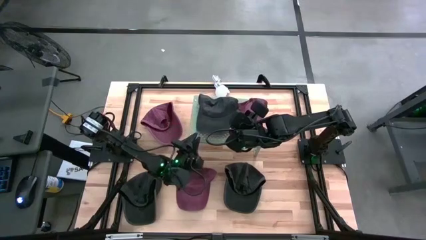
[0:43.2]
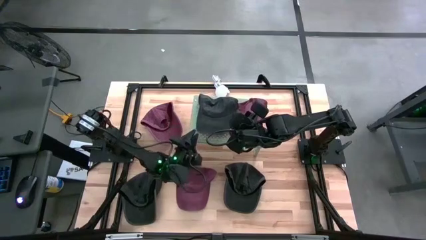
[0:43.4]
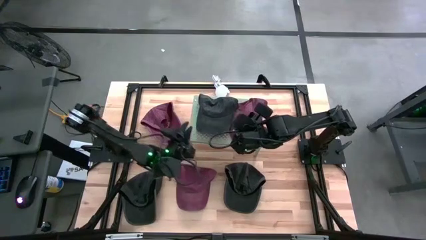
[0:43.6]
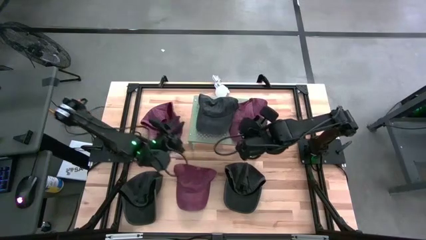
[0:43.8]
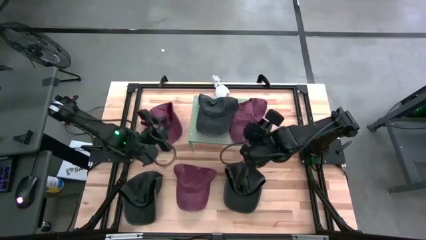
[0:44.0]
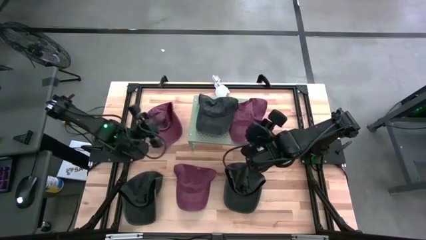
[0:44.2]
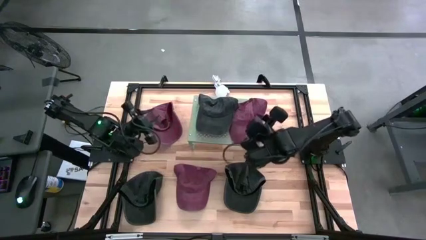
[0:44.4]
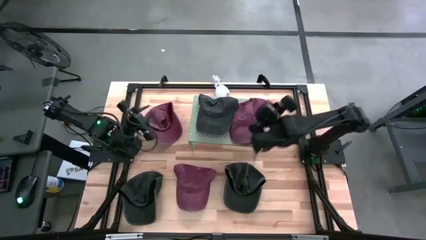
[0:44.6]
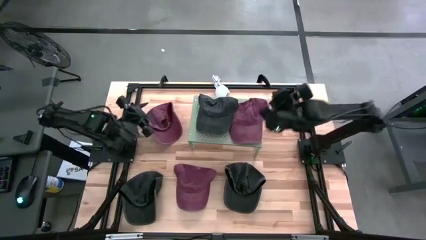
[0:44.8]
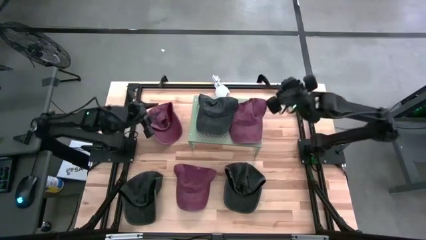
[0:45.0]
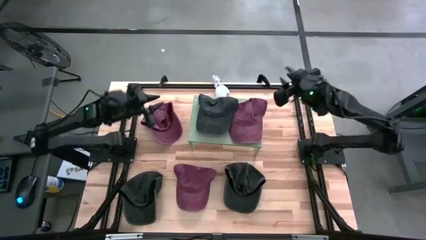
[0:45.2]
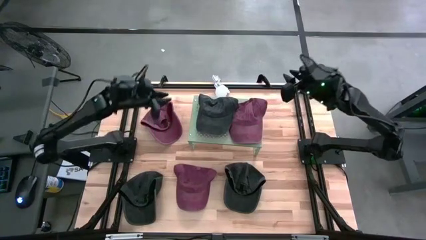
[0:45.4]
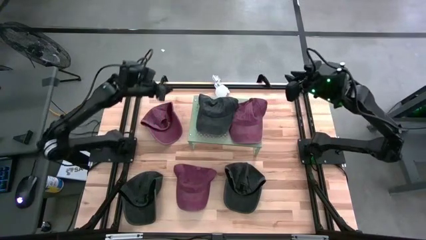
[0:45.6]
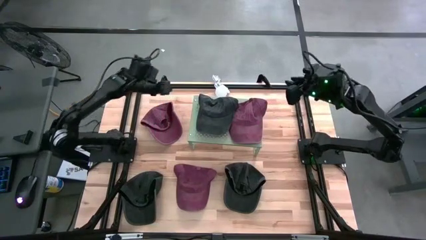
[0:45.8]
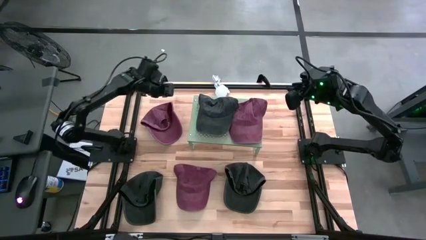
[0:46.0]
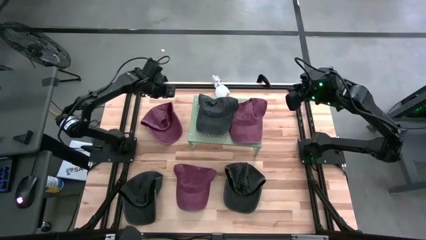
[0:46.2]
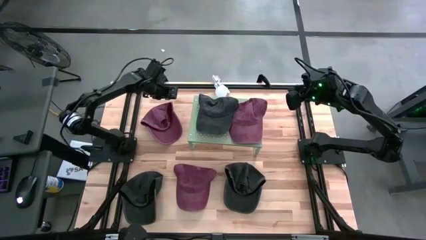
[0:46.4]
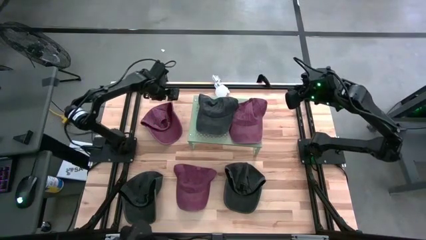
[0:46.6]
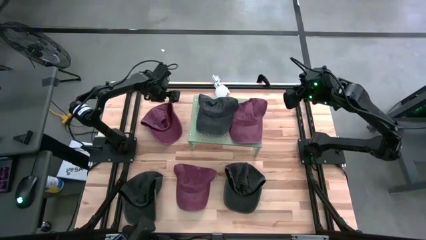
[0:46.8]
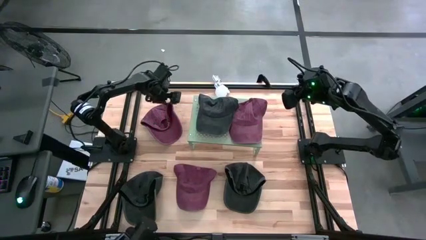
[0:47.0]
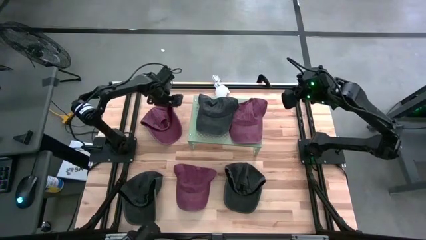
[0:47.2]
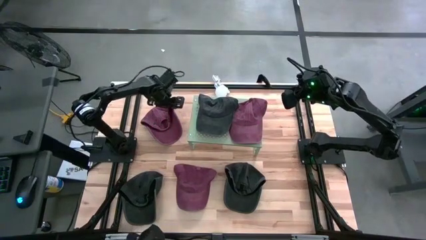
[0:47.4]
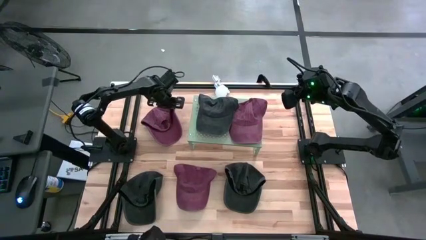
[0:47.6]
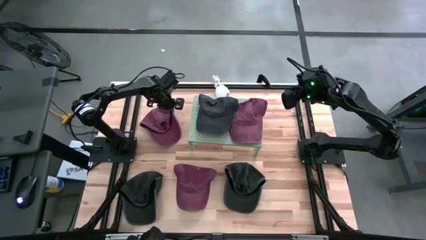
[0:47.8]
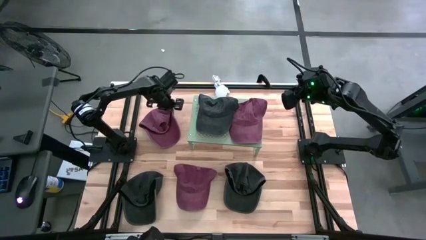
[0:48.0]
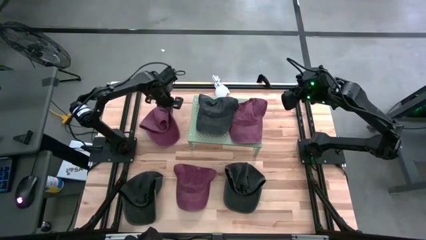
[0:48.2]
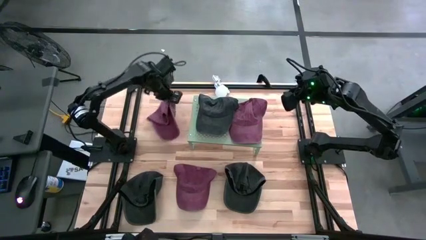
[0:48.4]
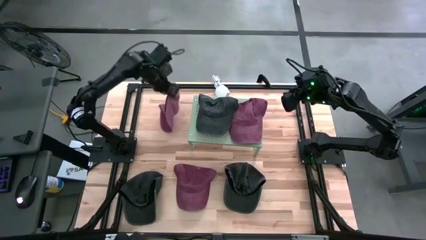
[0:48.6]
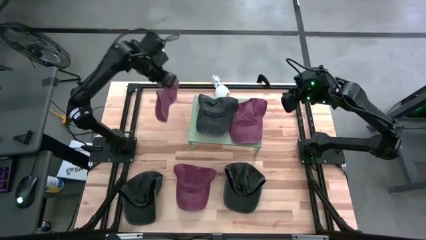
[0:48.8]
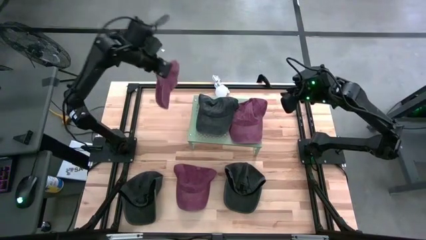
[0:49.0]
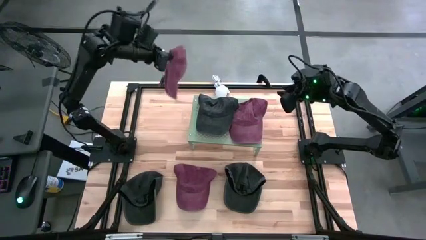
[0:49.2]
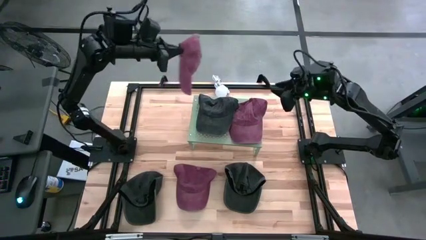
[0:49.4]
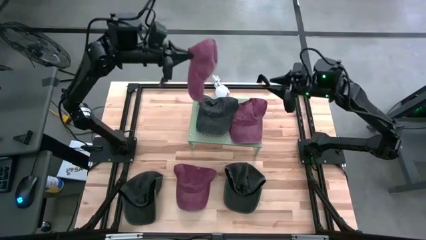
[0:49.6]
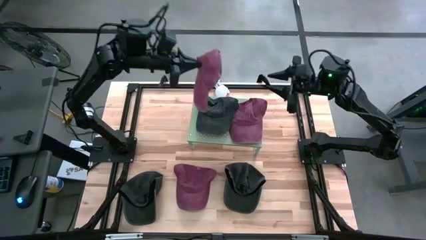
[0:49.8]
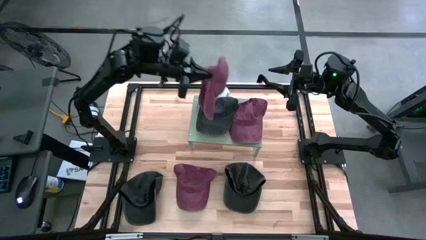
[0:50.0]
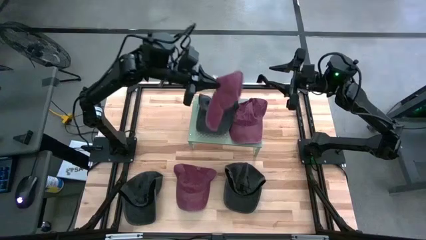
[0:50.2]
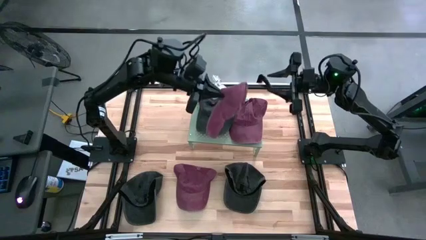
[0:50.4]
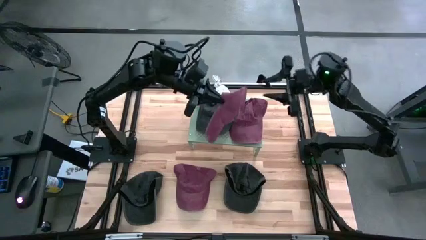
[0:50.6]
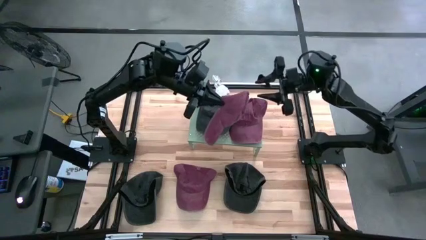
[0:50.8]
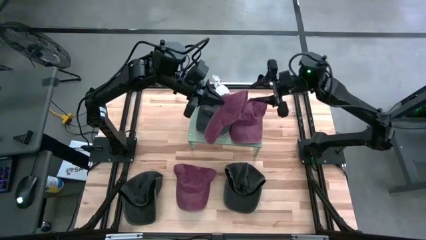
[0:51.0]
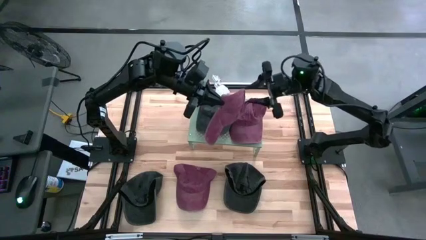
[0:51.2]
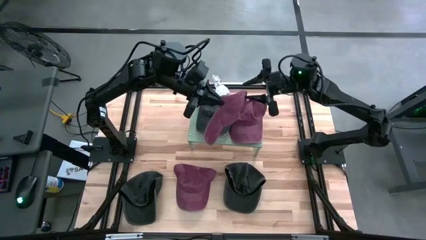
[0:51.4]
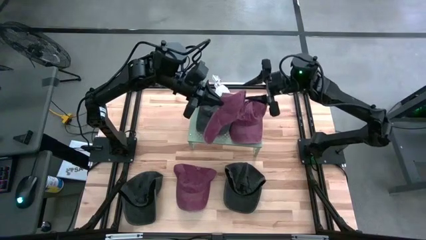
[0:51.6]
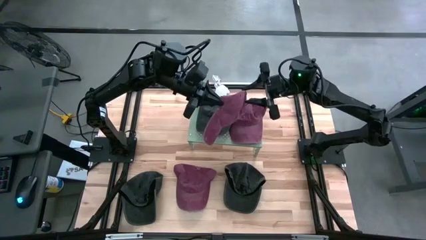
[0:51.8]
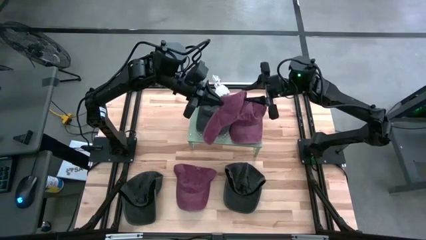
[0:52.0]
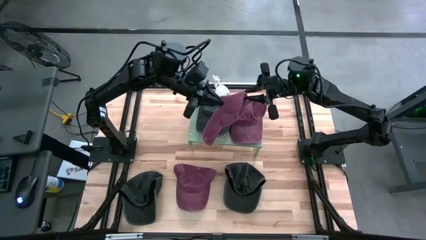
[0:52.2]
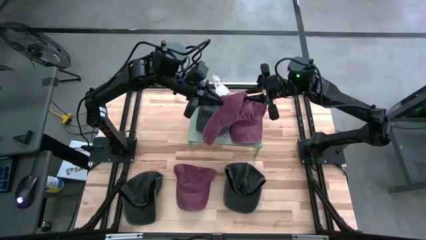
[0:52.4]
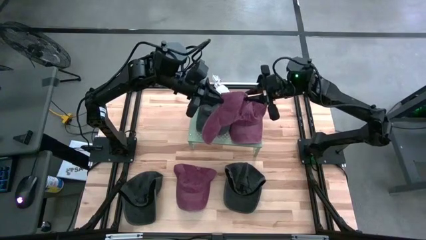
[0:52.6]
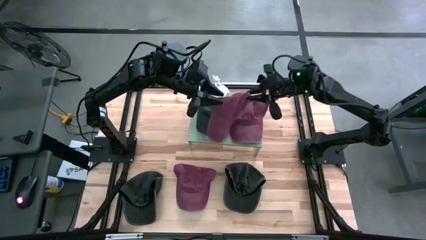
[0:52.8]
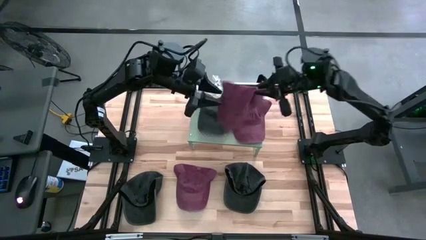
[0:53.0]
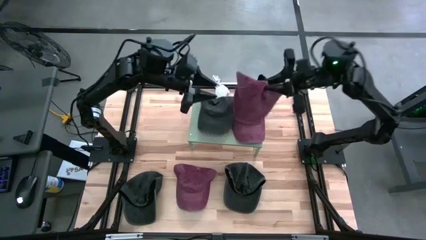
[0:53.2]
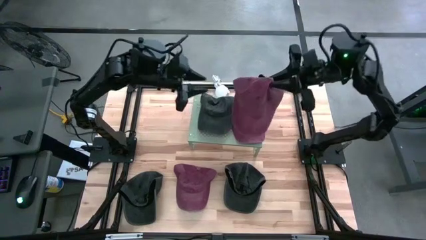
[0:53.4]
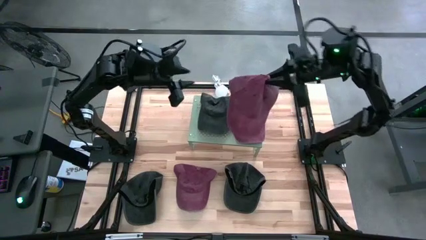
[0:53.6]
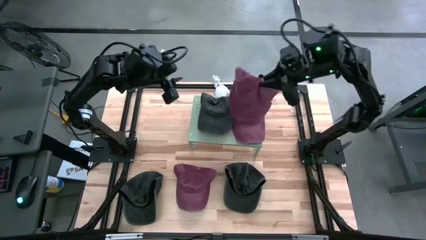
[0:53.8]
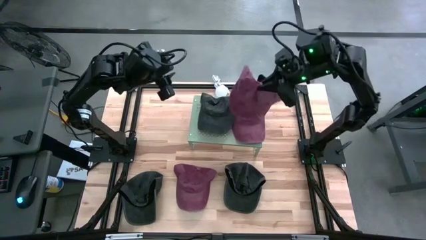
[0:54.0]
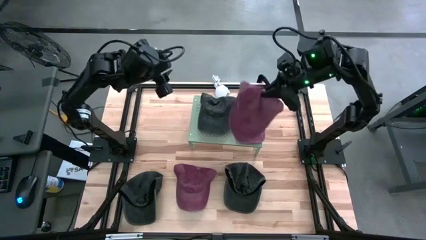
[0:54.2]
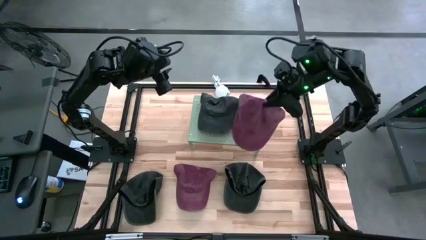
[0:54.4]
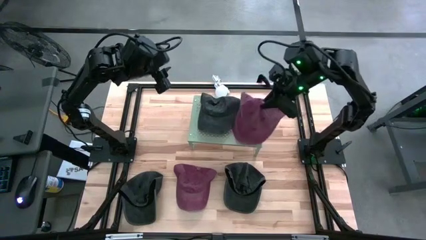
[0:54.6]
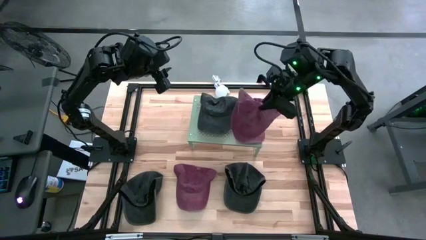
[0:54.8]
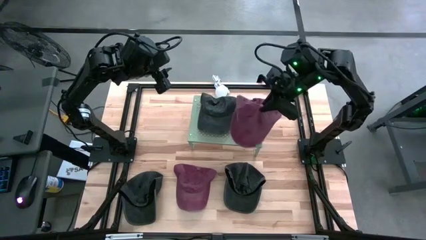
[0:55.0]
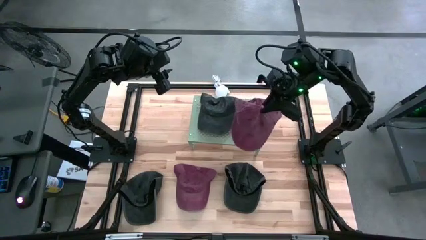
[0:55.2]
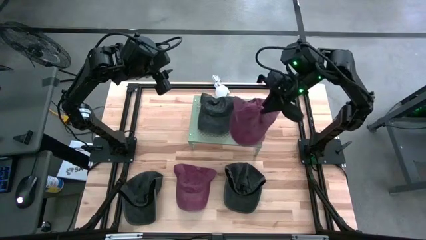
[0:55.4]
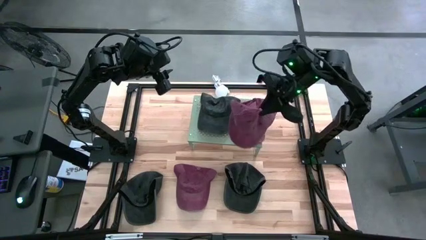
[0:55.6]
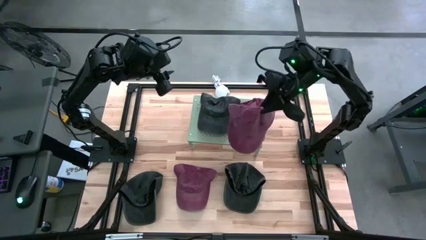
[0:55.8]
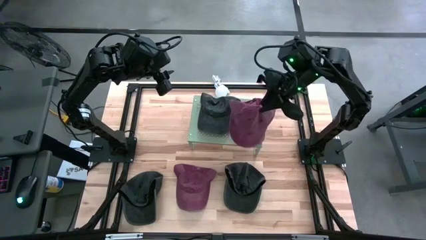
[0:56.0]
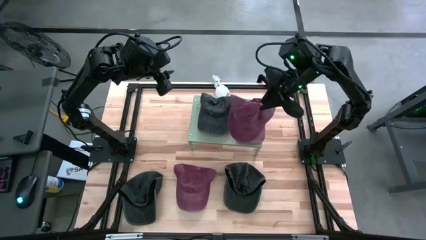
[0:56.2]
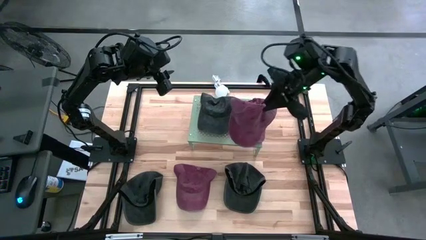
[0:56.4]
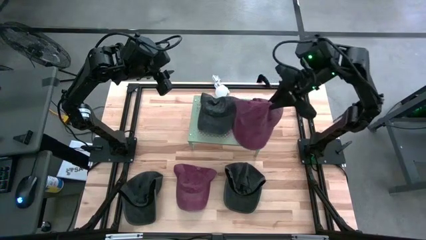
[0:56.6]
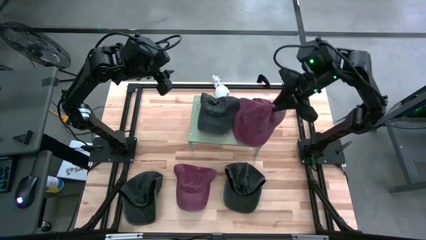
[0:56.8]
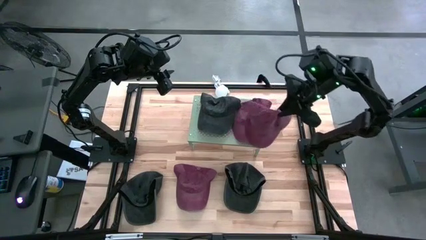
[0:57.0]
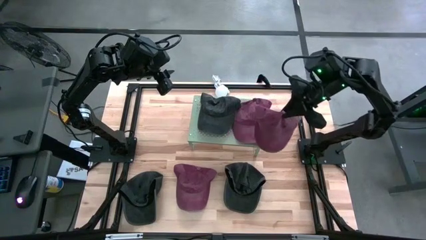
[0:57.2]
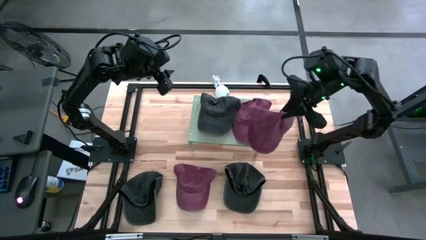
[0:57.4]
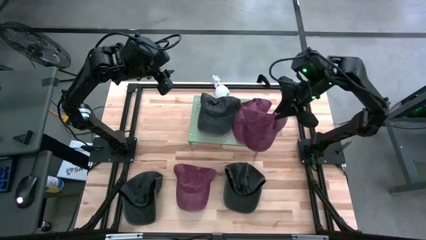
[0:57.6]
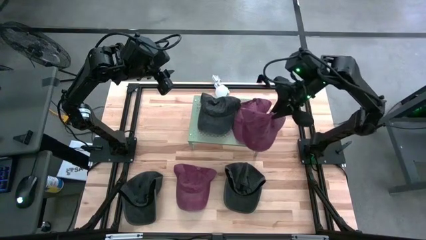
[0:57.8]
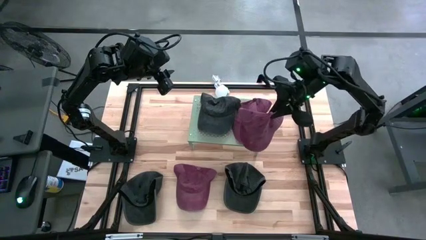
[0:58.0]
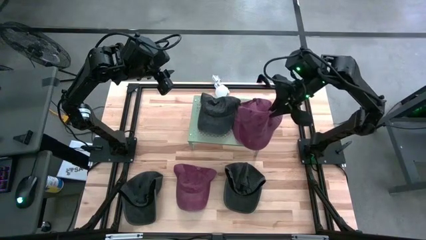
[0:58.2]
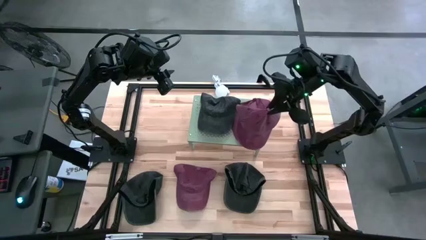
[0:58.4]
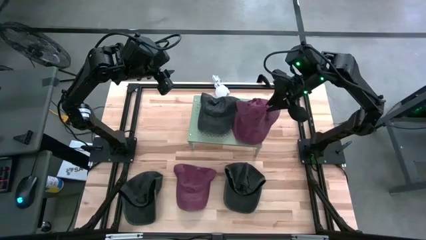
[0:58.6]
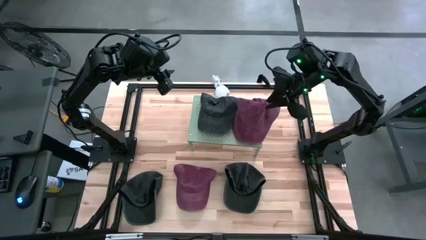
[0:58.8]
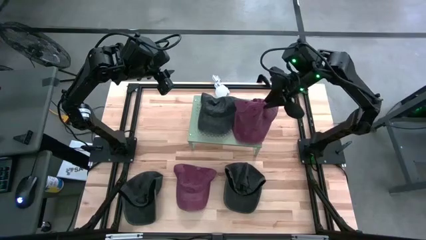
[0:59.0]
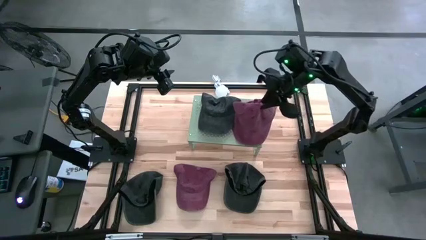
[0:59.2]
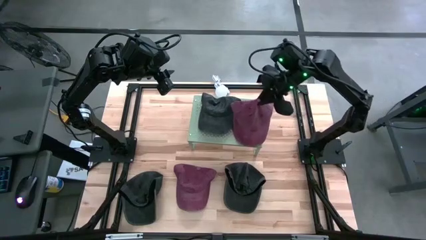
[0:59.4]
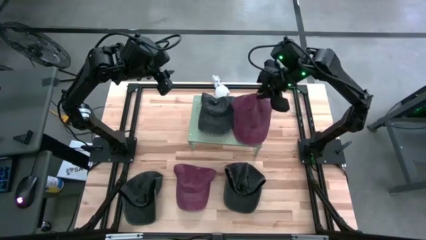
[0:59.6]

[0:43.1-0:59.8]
Task: Pick & Place hat
Stack the top red cap on top of the red cap on the shelf
